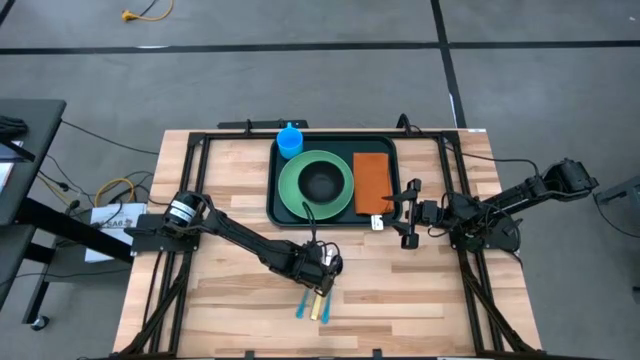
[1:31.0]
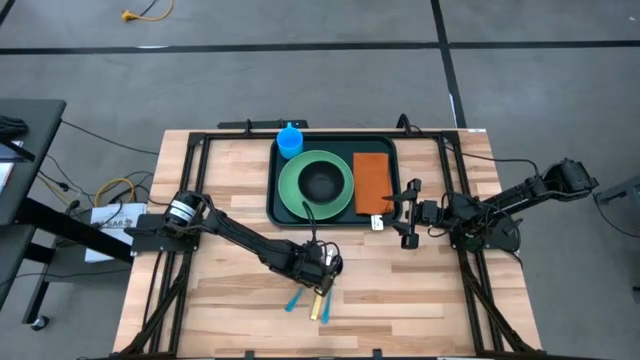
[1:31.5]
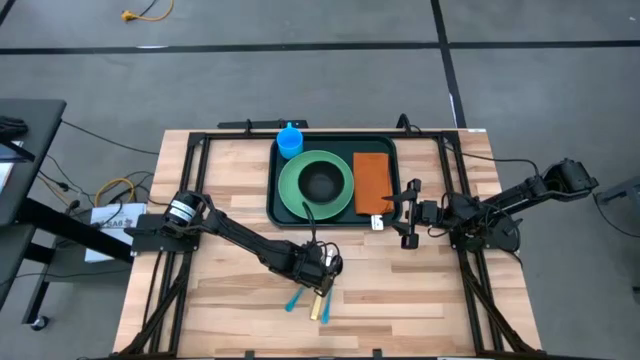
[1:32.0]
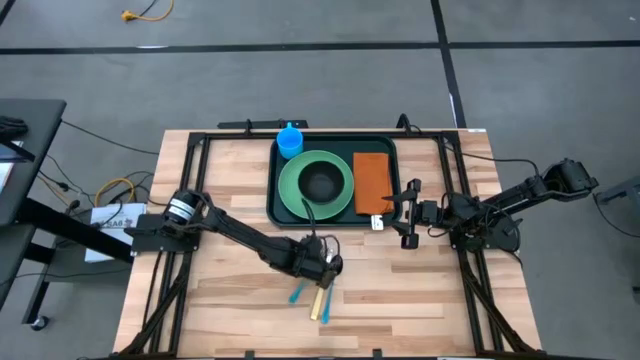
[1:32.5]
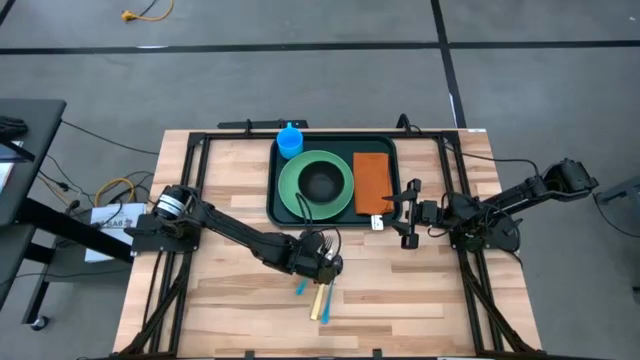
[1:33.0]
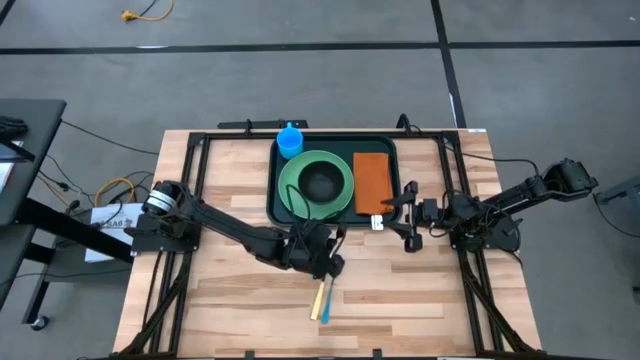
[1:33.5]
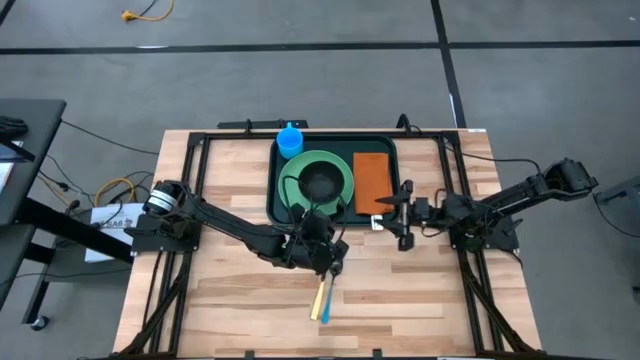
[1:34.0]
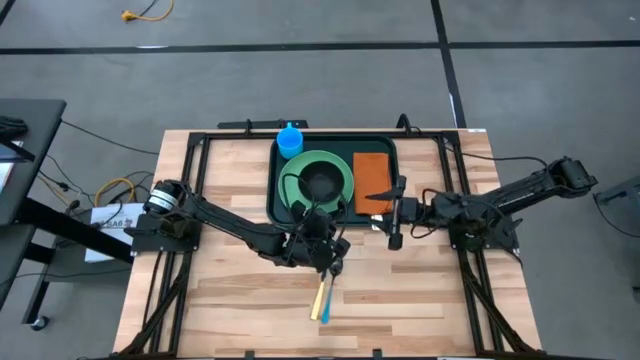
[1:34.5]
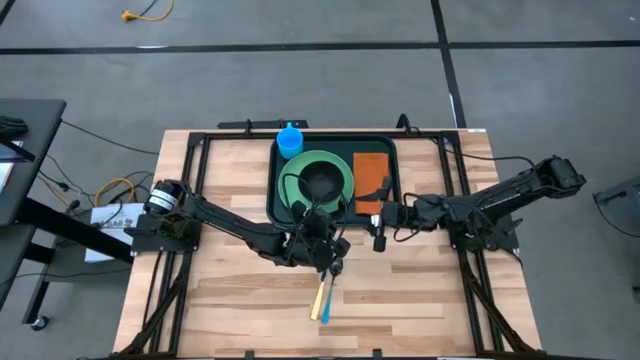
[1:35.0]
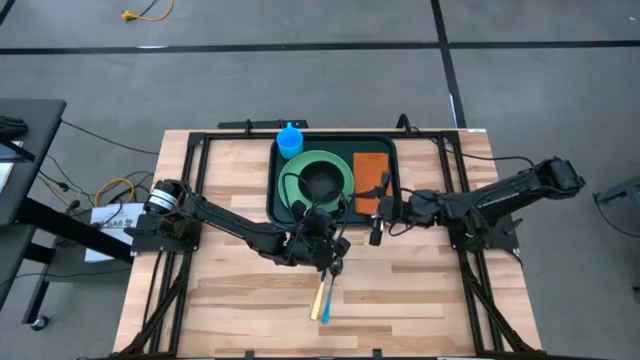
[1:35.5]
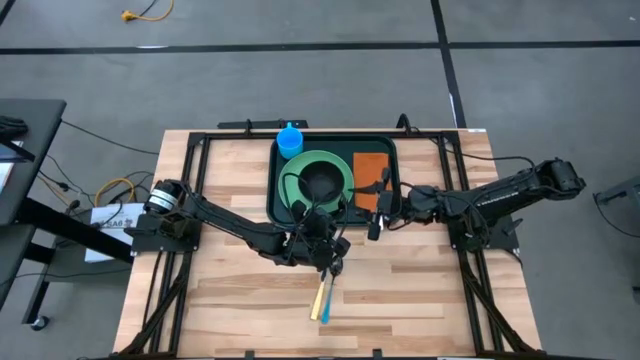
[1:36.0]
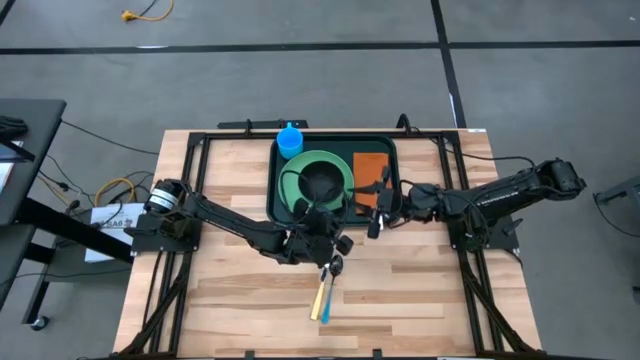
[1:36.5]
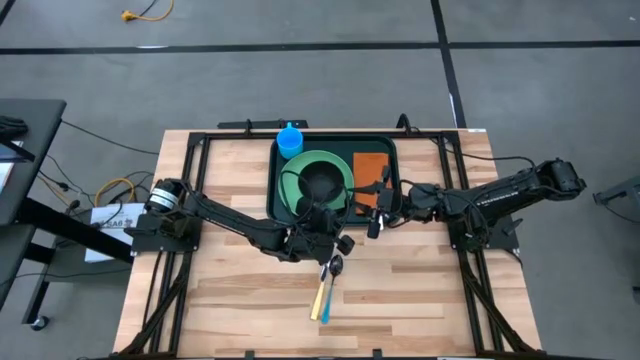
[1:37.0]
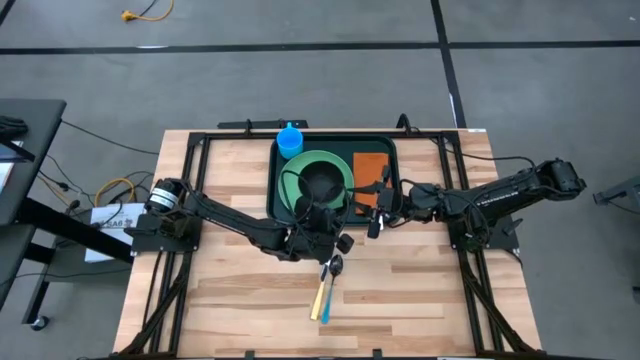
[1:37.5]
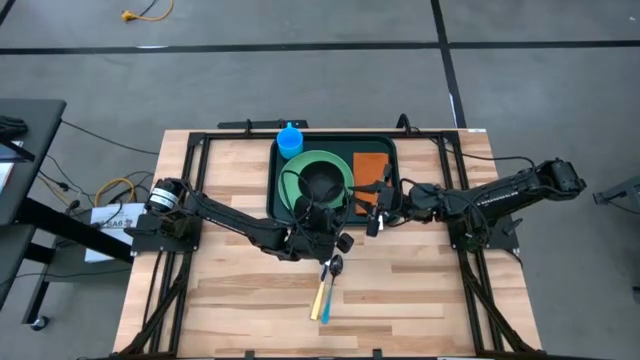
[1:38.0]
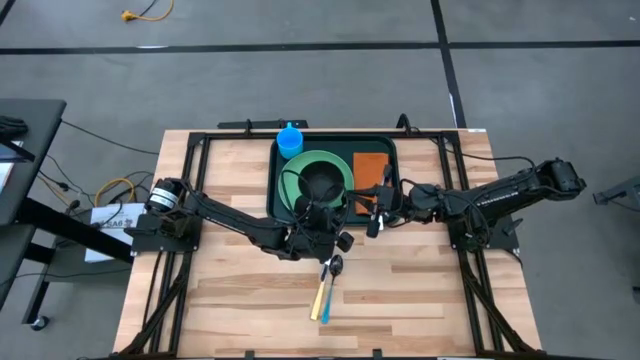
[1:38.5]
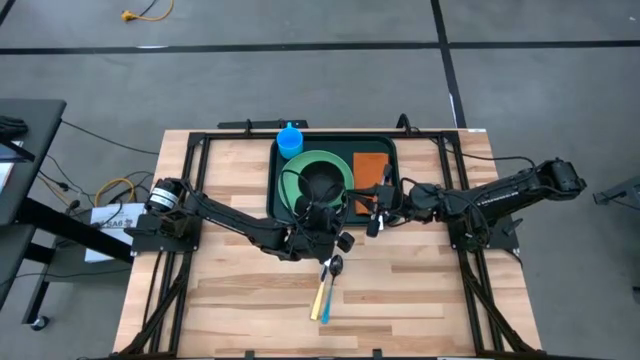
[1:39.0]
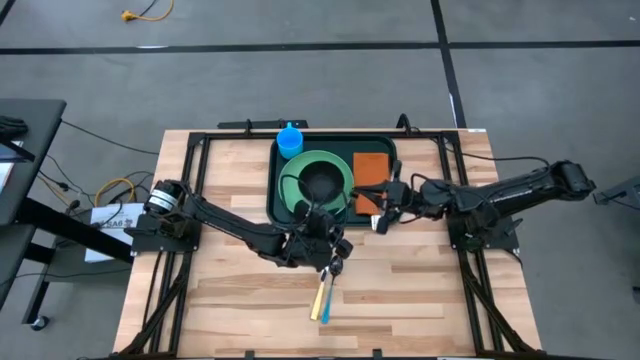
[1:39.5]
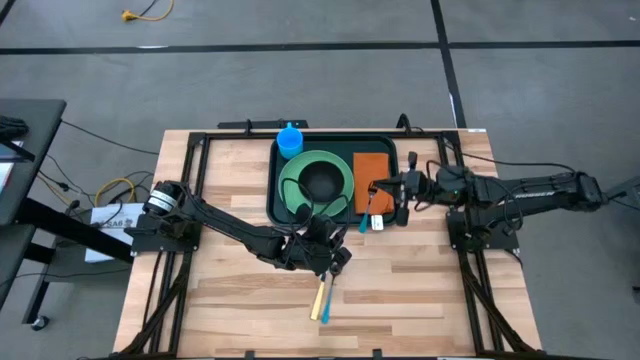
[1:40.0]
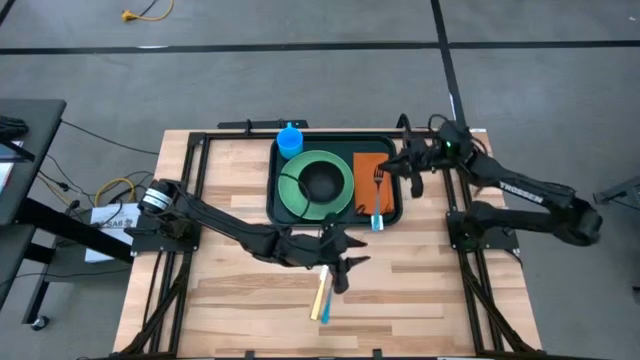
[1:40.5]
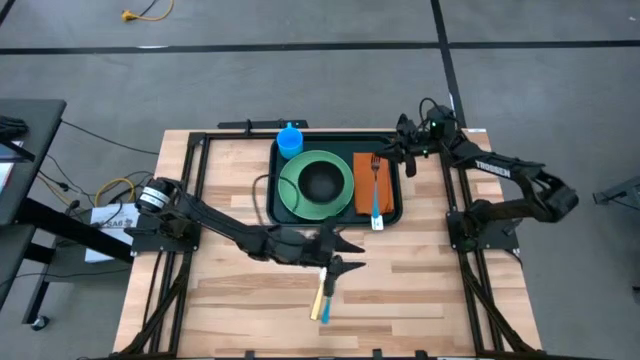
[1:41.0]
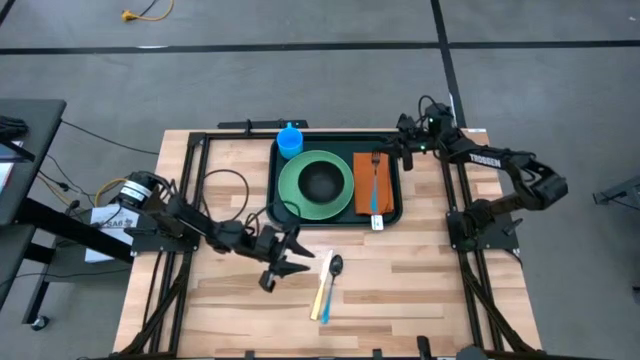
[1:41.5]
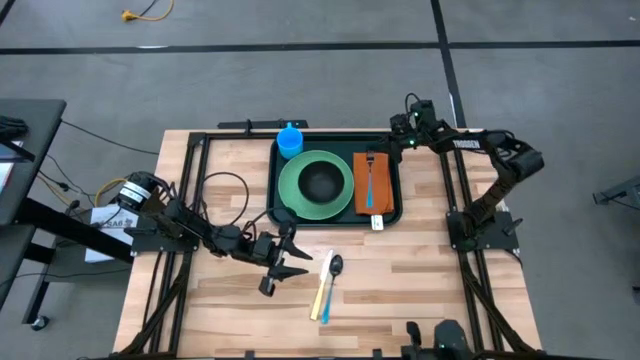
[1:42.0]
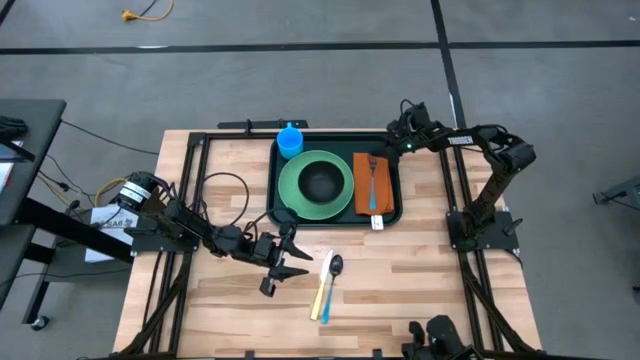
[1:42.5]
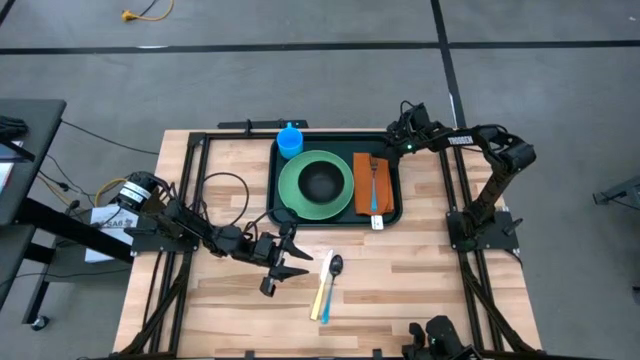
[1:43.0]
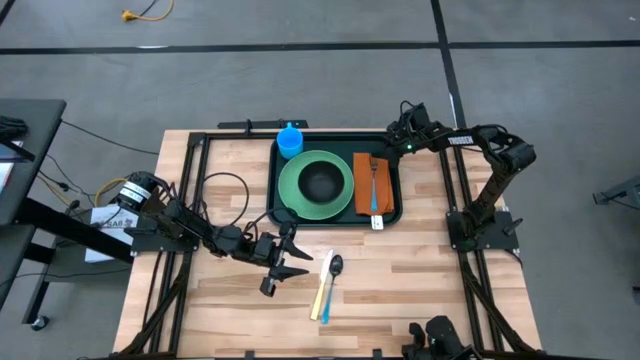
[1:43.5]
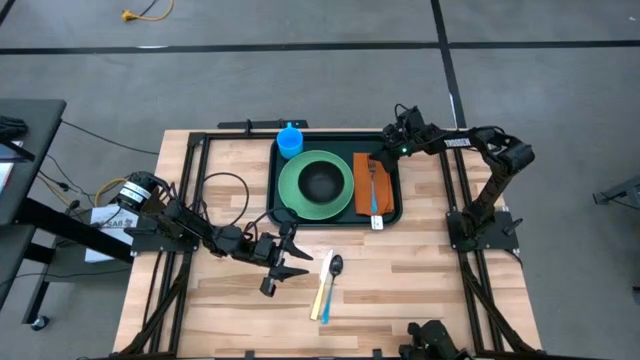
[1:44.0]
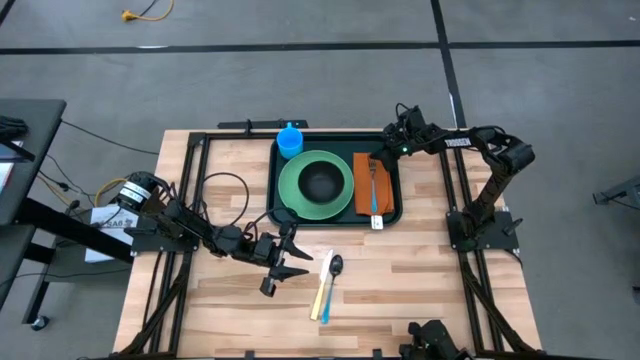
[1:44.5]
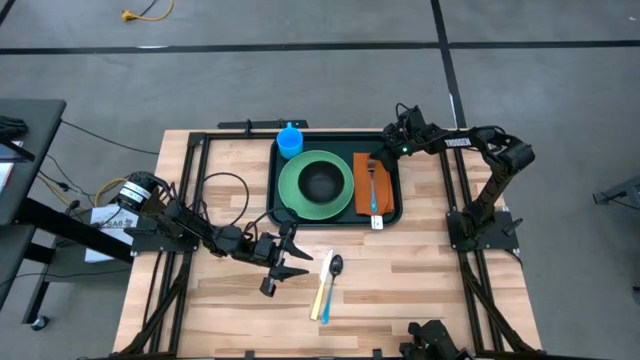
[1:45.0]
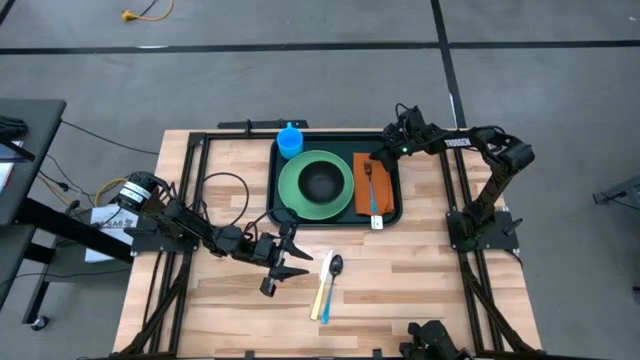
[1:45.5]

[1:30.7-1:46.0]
Task: Set up tray
Put the blue fork on the brown table napkin on the black serving tray

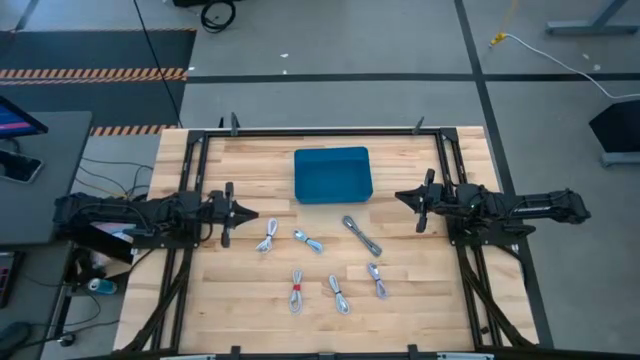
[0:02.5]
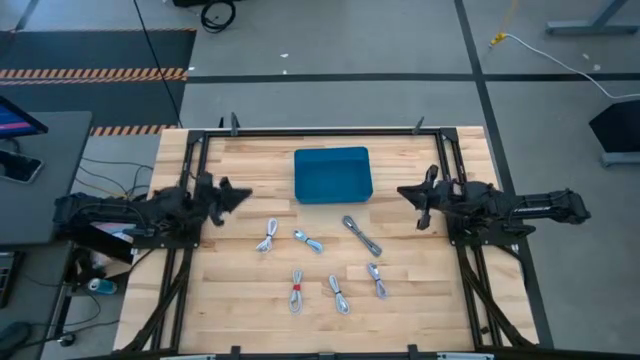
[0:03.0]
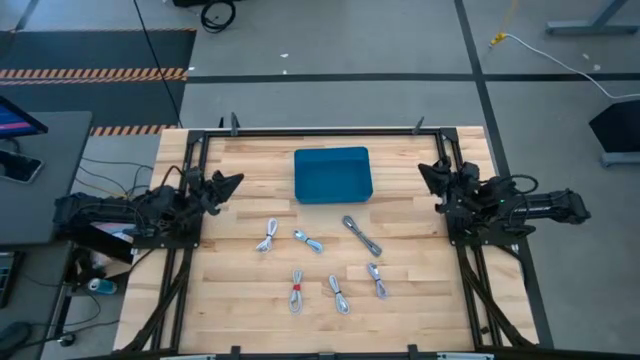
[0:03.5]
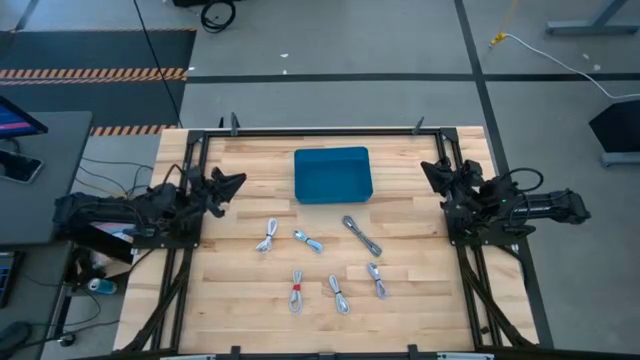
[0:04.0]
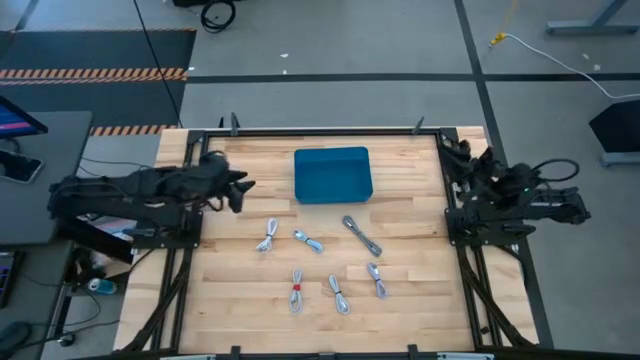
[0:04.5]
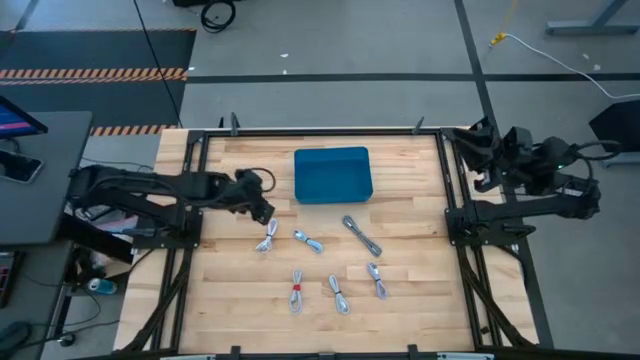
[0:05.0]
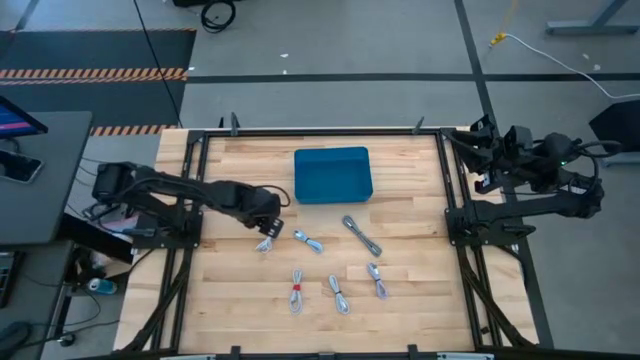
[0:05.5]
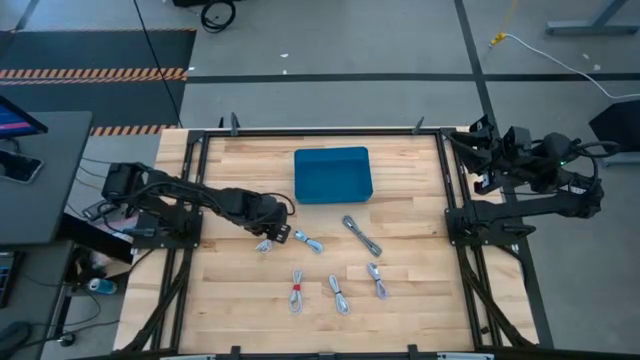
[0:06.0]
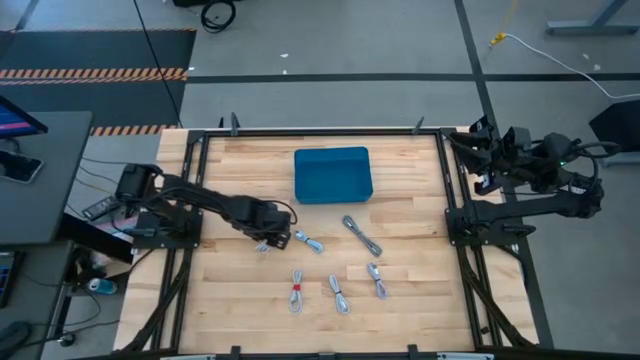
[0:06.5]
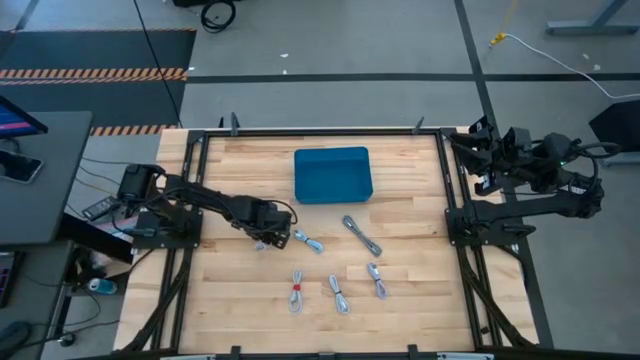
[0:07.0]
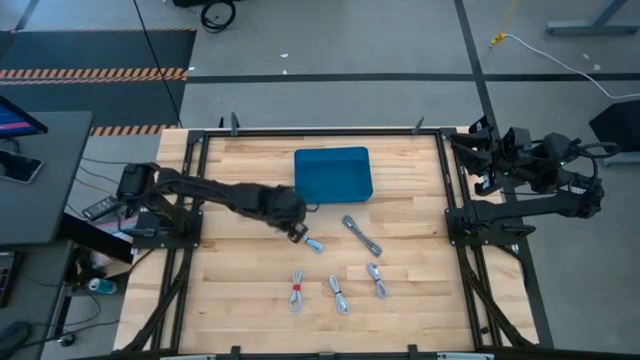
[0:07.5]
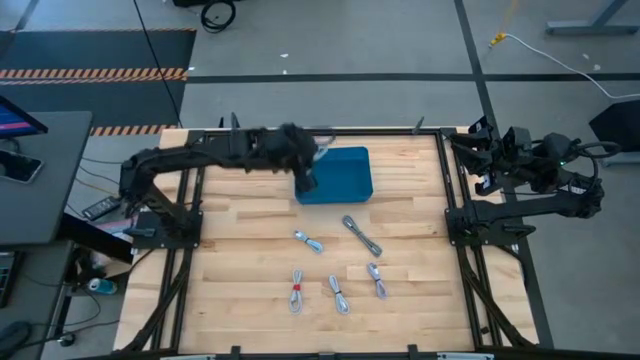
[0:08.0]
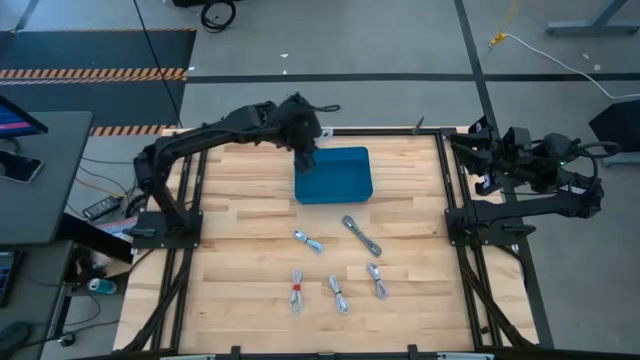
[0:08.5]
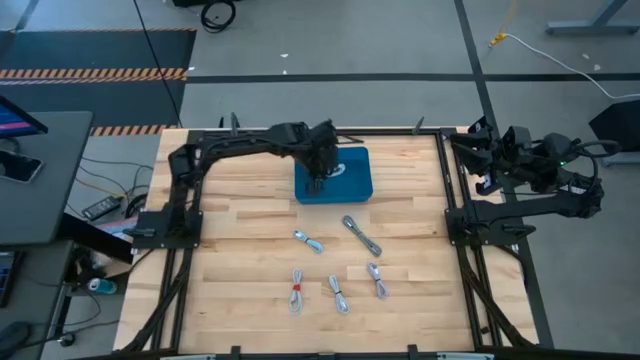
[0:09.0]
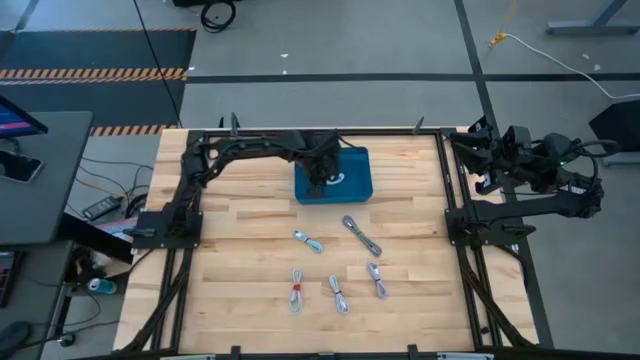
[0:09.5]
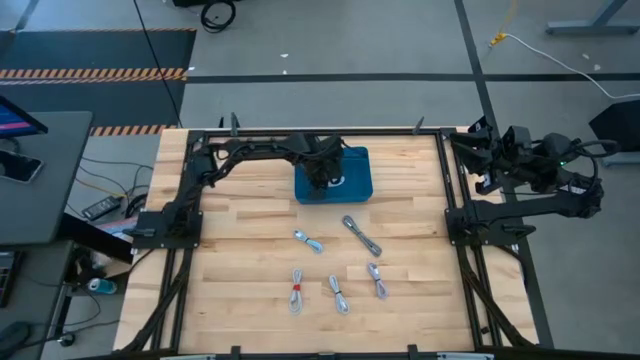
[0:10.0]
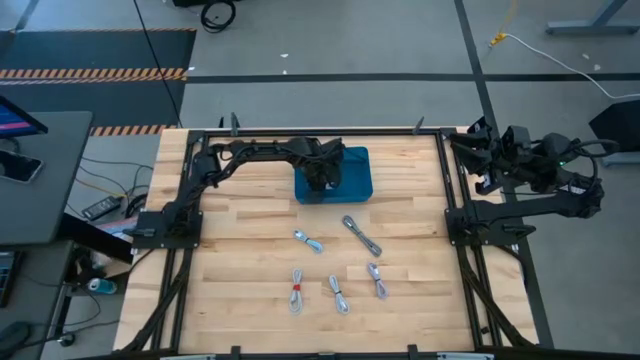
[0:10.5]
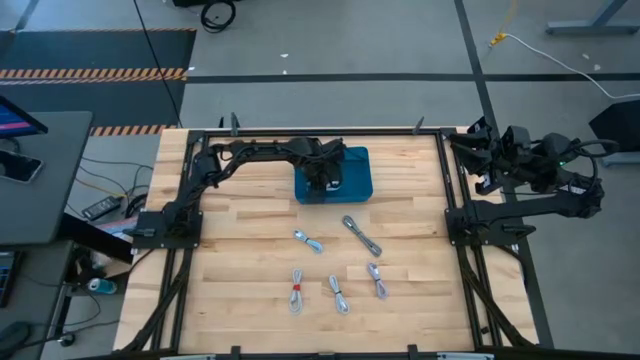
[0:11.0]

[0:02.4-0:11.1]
Task: Pick and place USB-C Cables
Put the white charger cable into the blue bin
